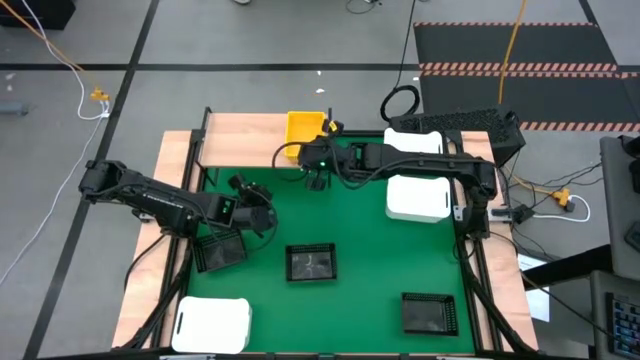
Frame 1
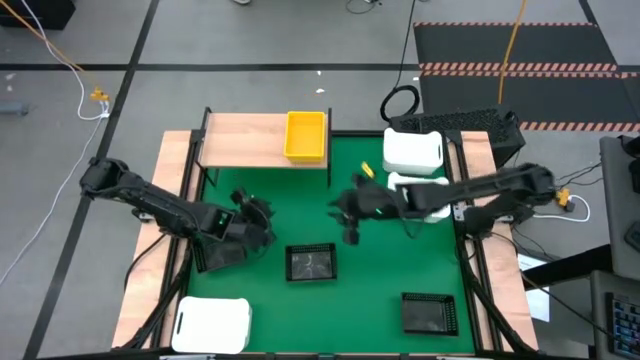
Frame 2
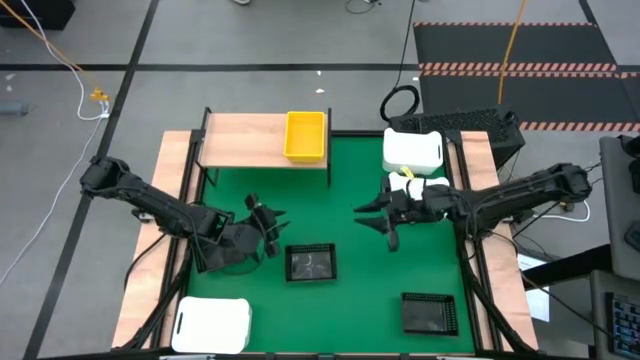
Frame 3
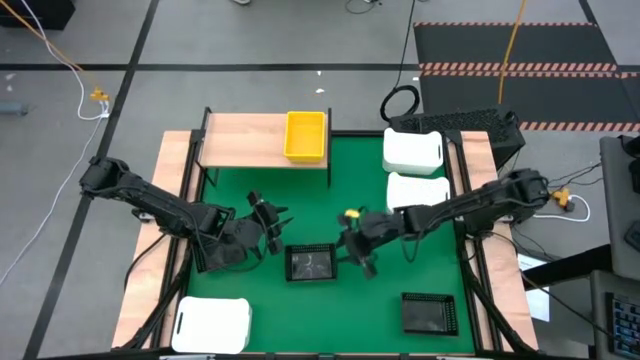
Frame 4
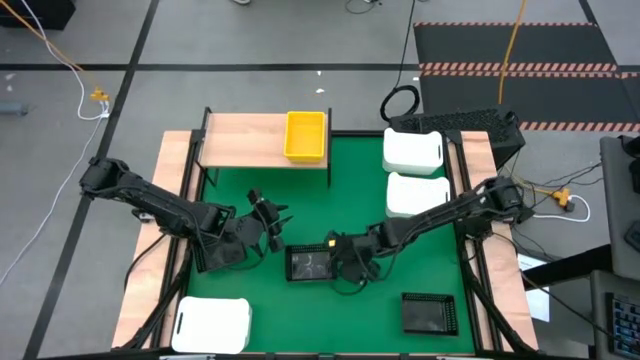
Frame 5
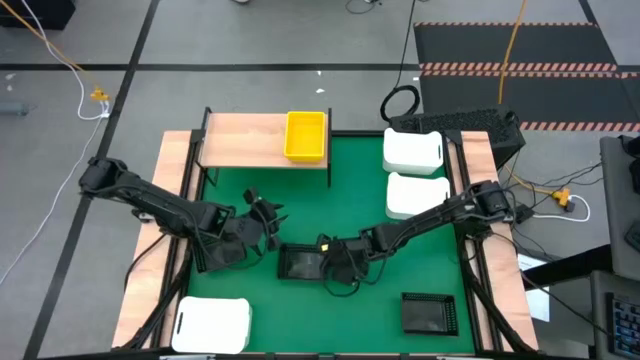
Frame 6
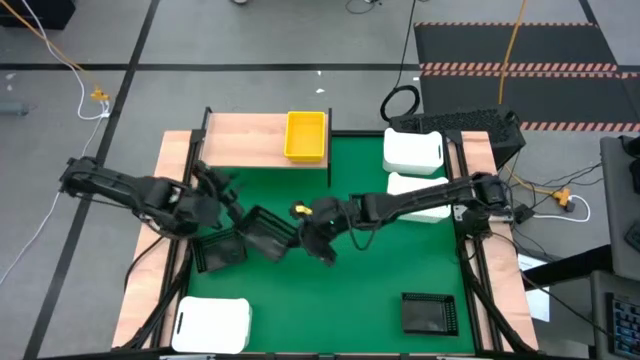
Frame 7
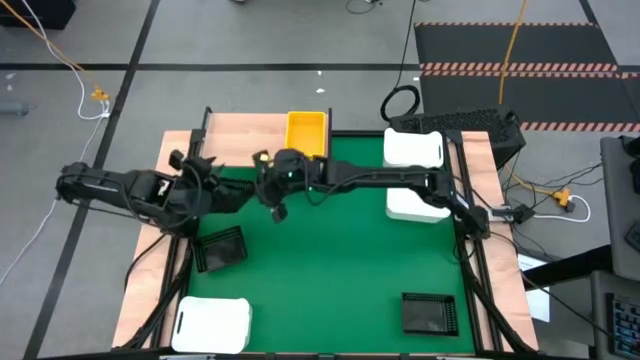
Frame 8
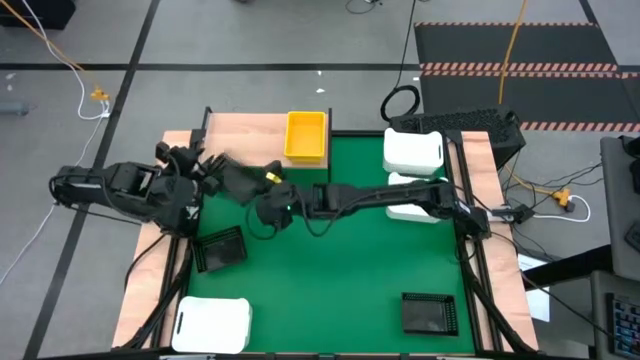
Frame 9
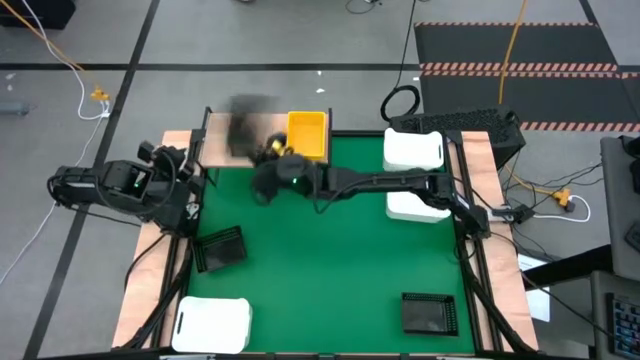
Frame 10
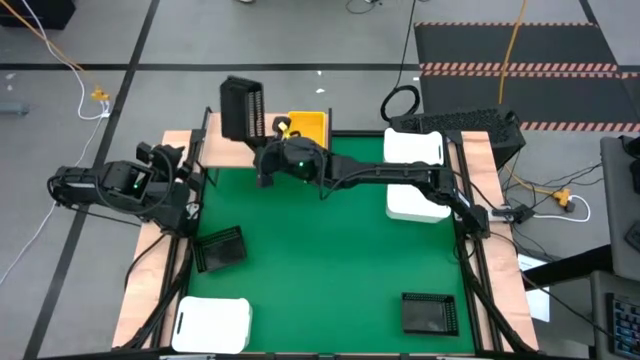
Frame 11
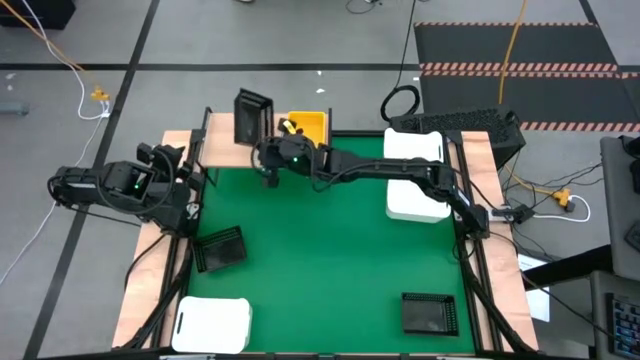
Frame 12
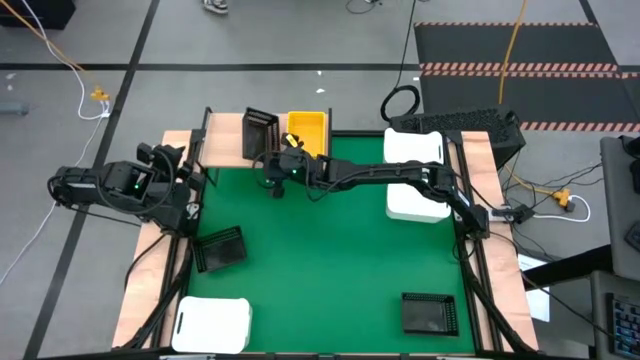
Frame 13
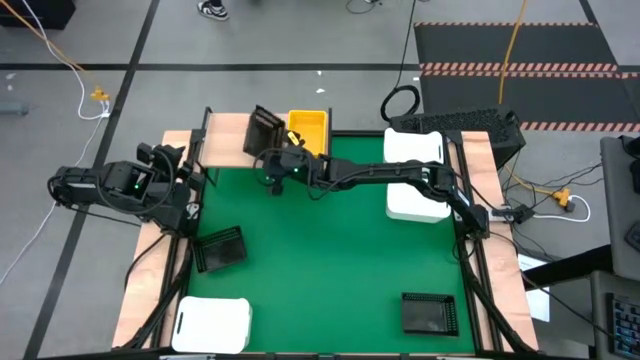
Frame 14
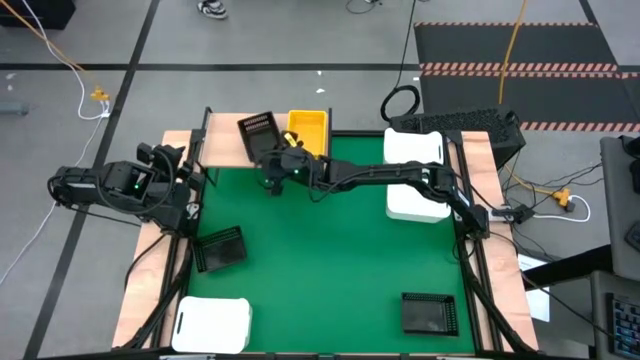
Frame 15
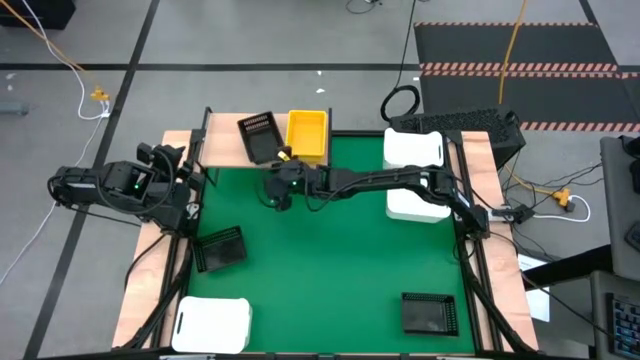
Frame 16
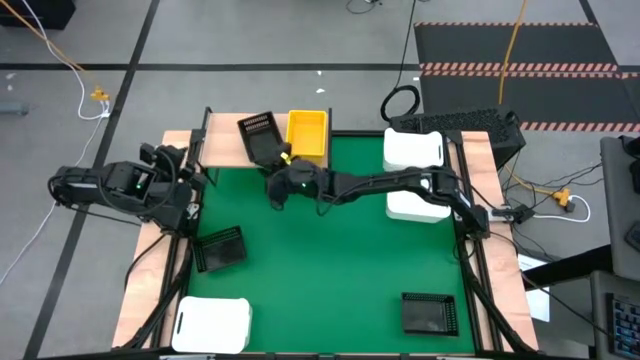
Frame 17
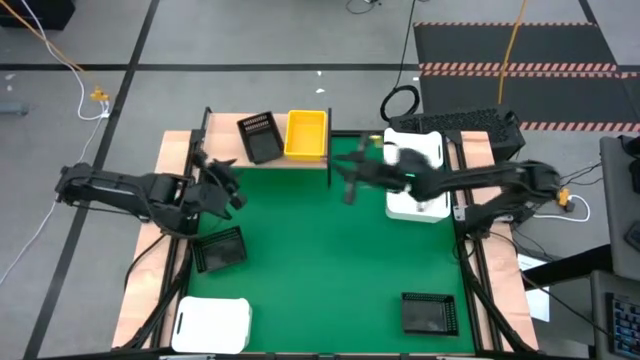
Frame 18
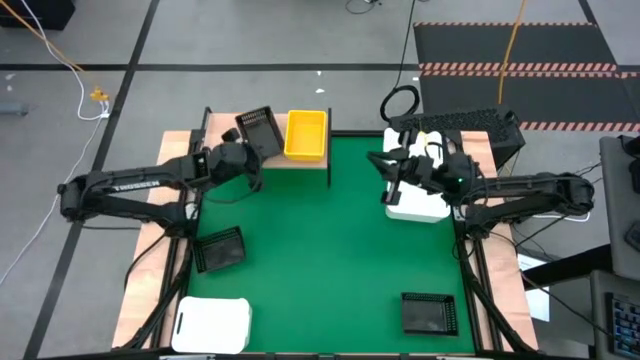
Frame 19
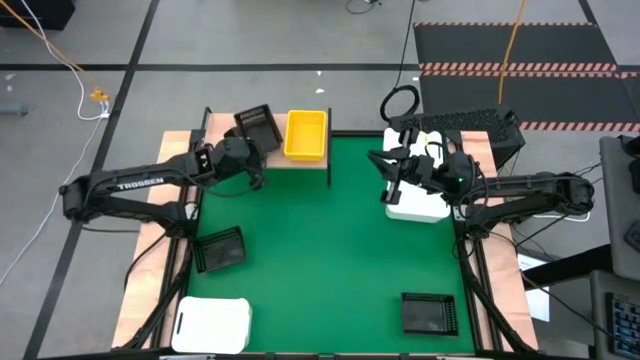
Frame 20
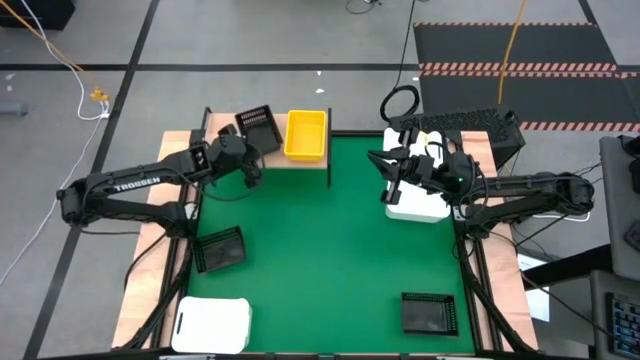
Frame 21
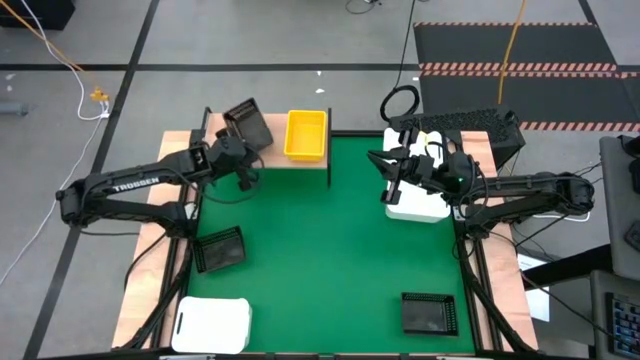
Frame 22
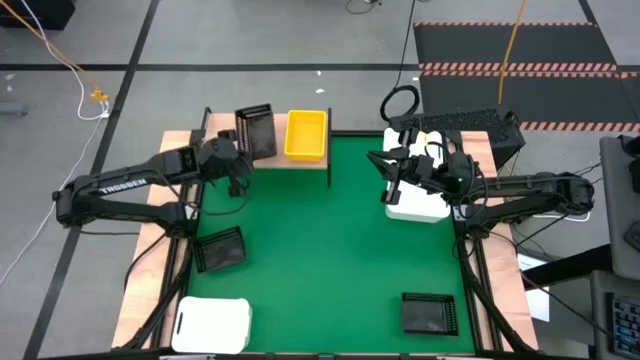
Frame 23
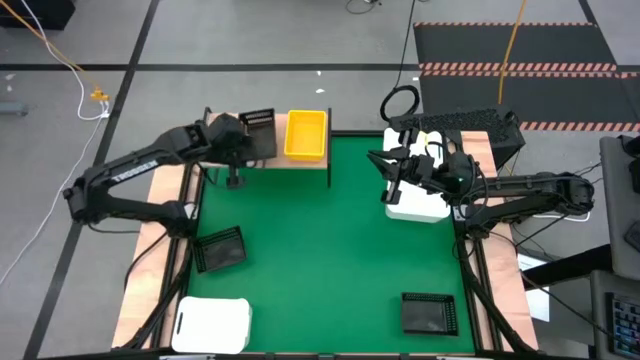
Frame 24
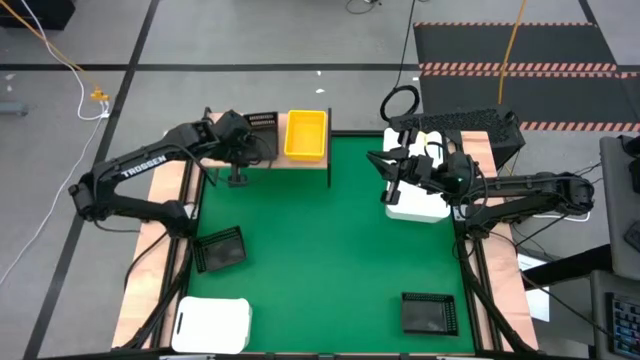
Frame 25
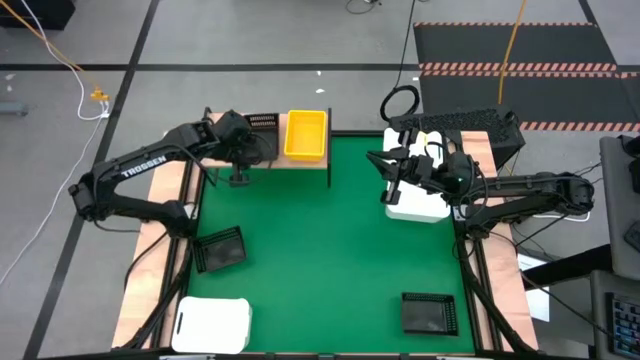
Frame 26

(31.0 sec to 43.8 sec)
Task: Stack baskets on shelf by color
Put the middle black bin on the shelf

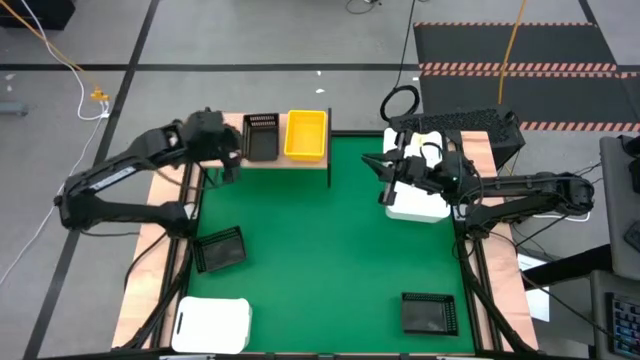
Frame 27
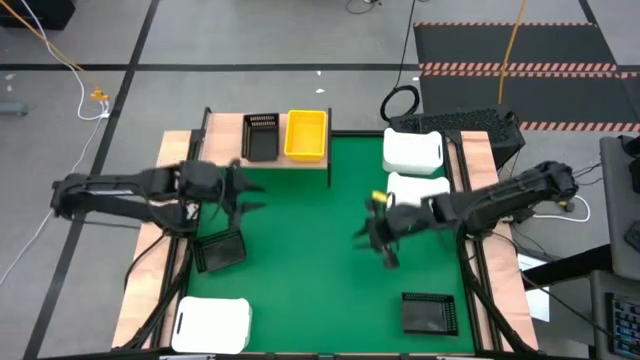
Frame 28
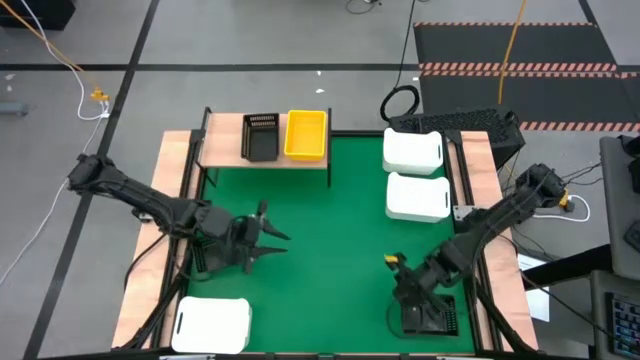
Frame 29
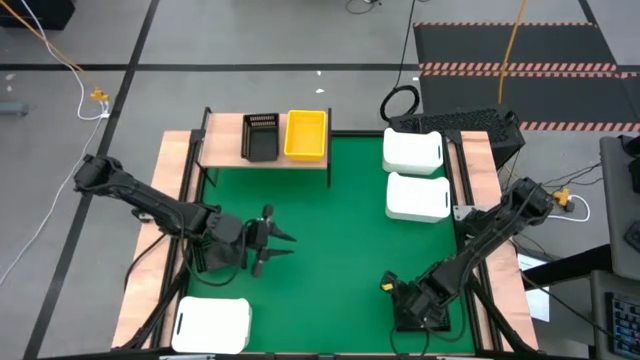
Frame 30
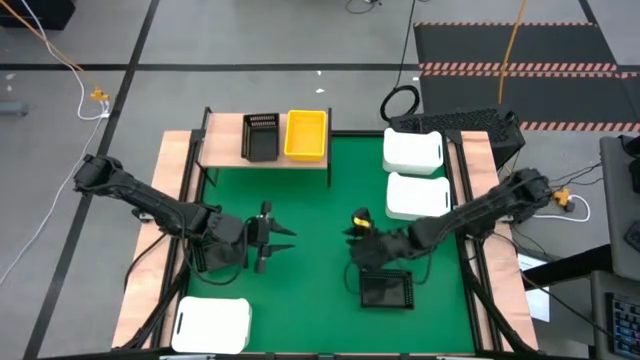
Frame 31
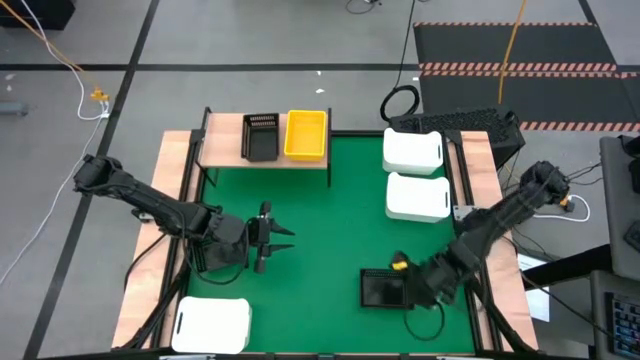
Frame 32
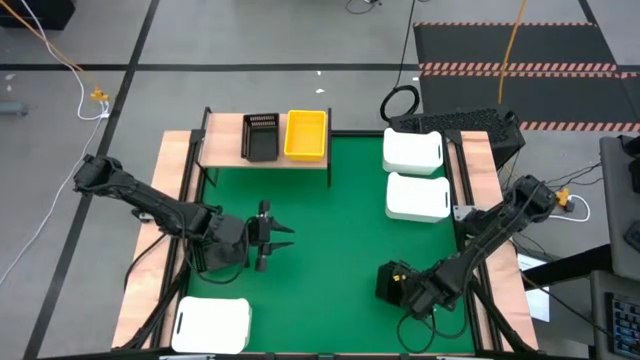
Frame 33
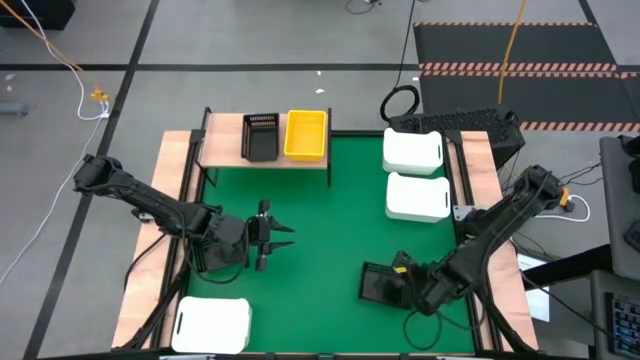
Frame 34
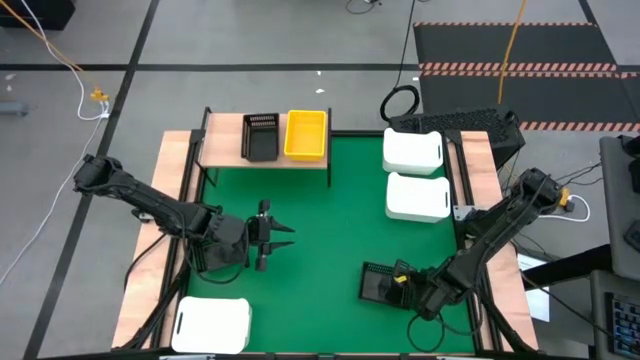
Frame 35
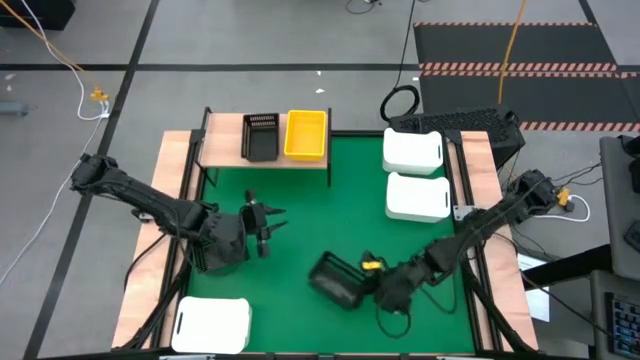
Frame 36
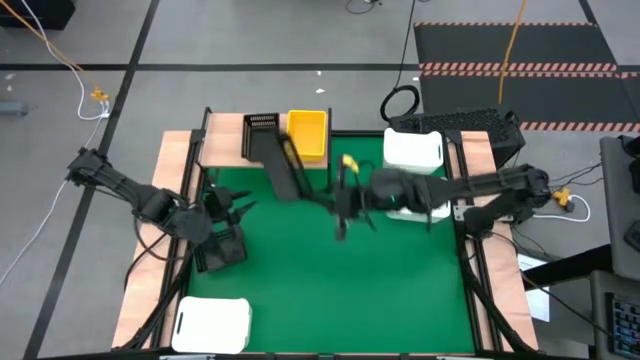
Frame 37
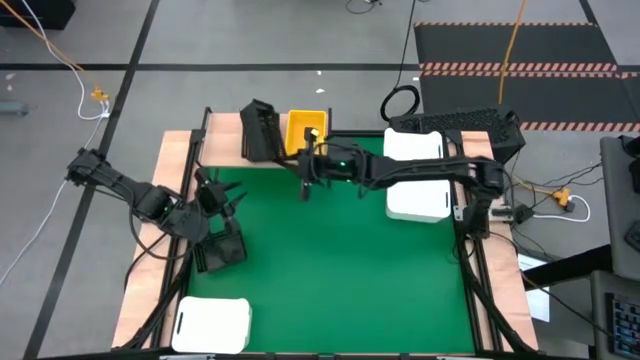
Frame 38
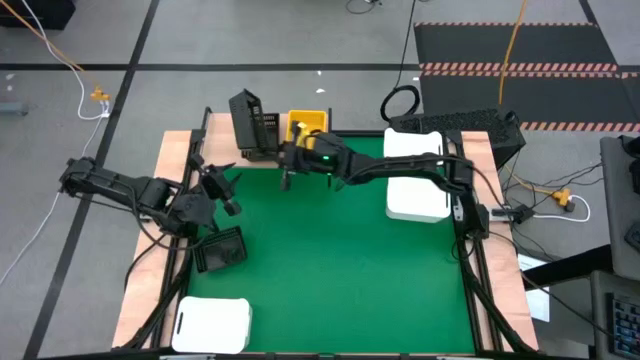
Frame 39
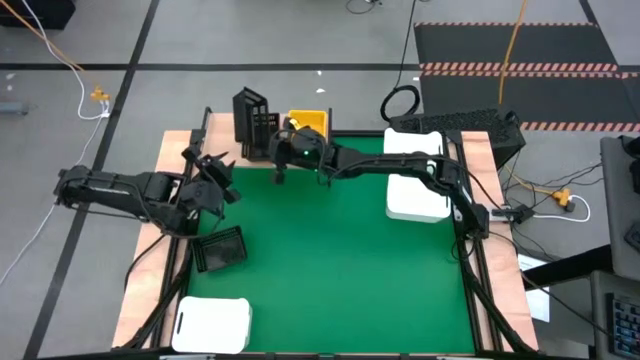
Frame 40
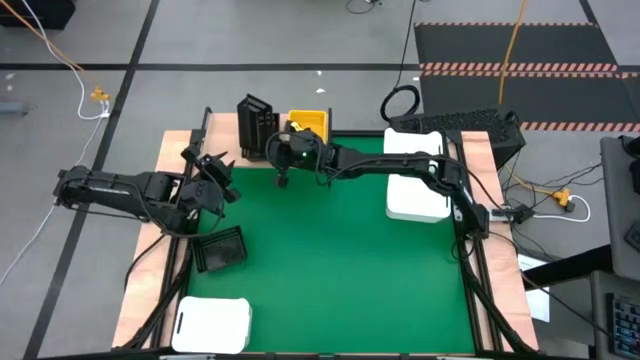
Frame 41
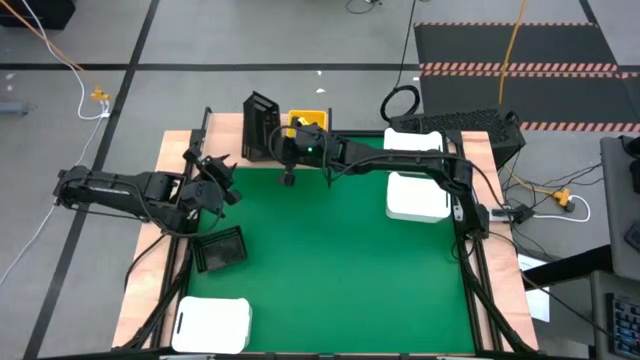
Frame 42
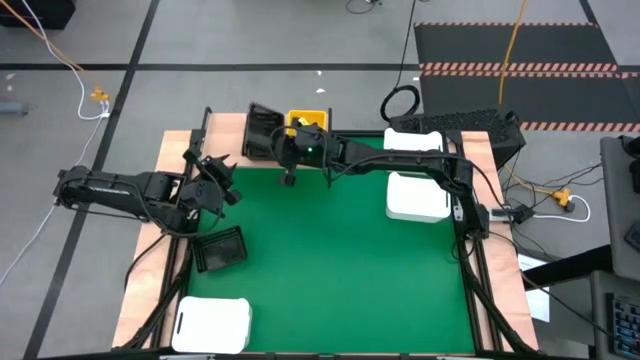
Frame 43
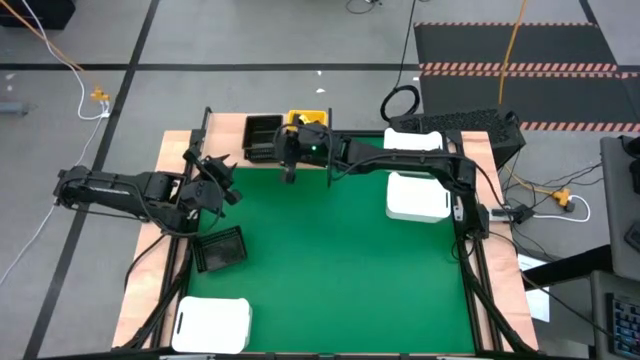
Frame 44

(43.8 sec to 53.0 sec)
Stack the bottom black bin on top of the other black bin on the shelf
